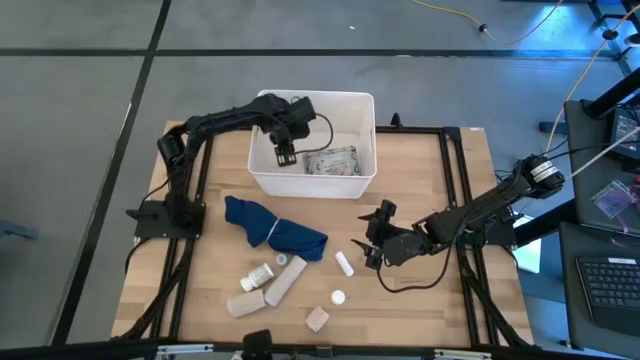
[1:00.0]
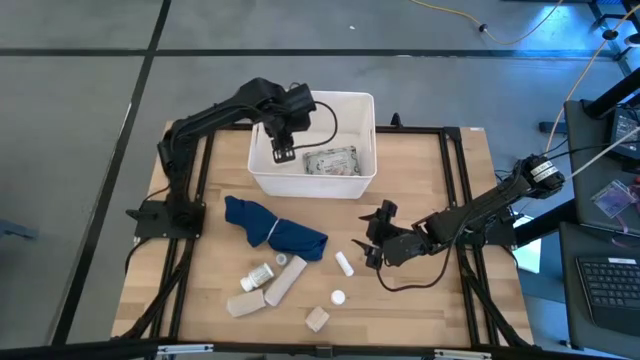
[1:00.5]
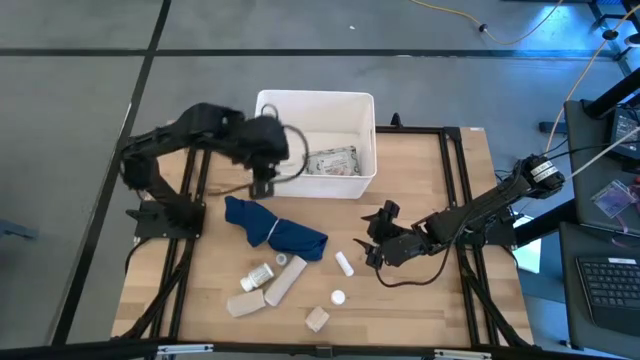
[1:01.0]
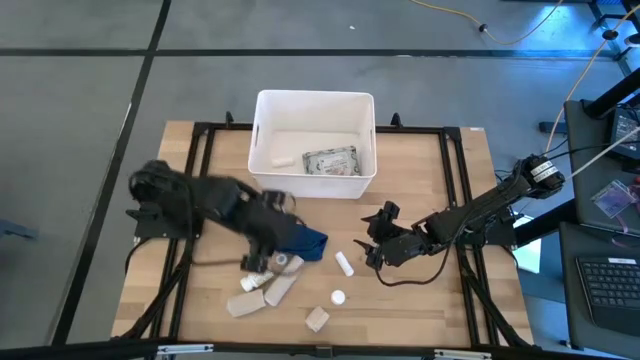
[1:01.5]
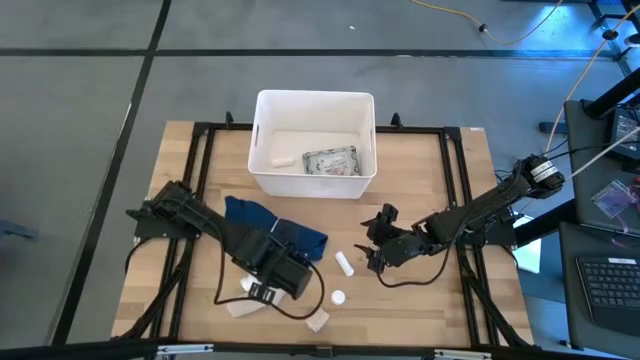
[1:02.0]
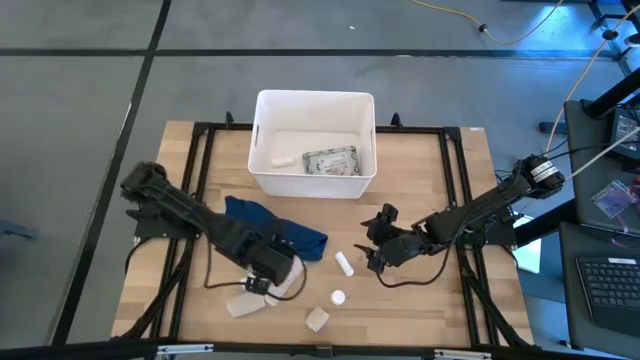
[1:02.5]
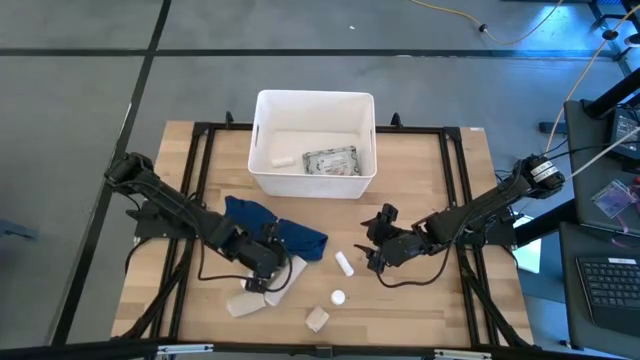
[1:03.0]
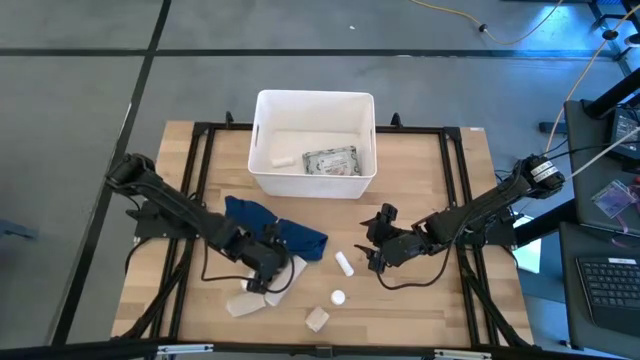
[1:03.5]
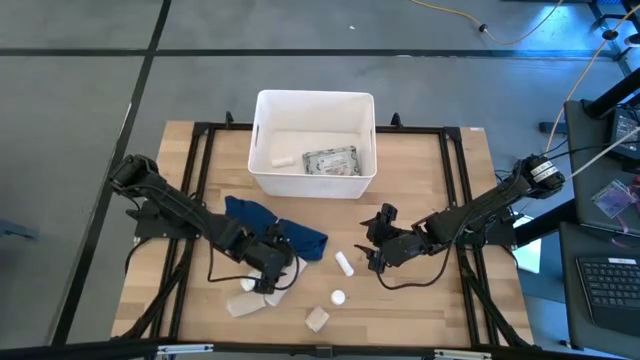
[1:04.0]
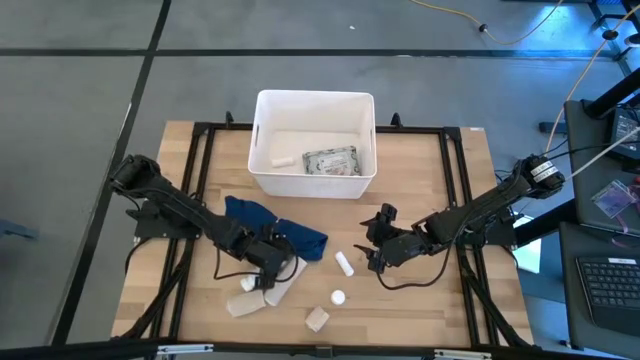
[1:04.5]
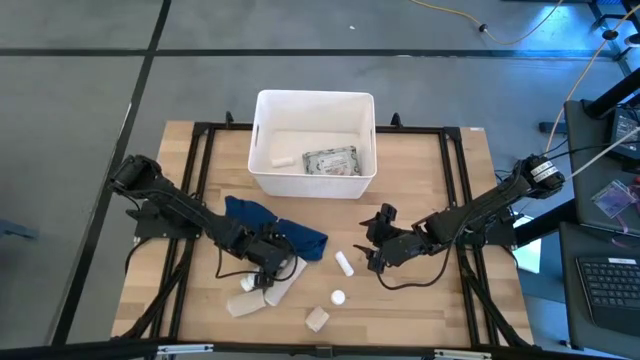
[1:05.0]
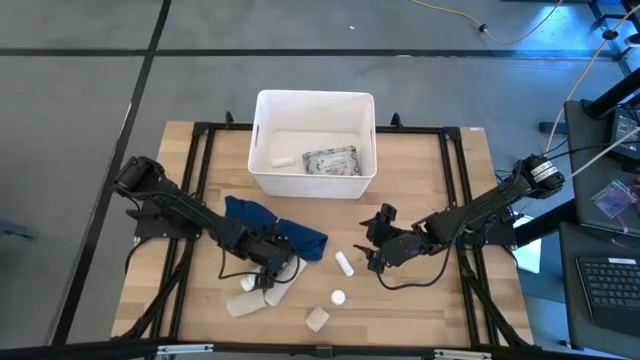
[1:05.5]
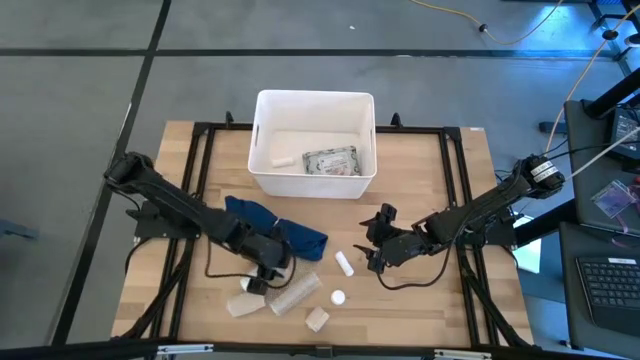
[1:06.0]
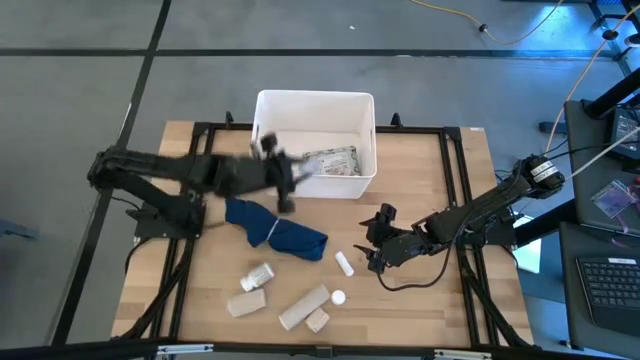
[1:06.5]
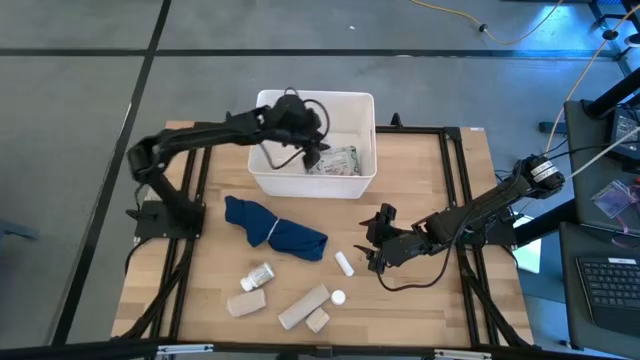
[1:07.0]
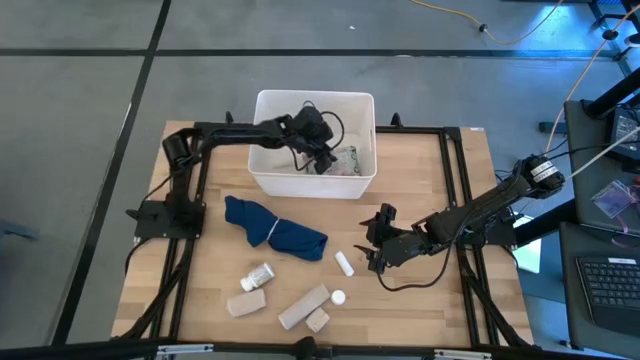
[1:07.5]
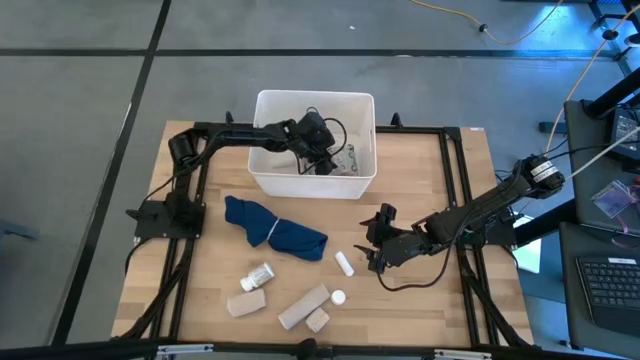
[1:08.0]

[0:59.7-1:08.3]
Task: Pick & place medical supplies in basket/bin
Put the transparent pill bottle into the white bin

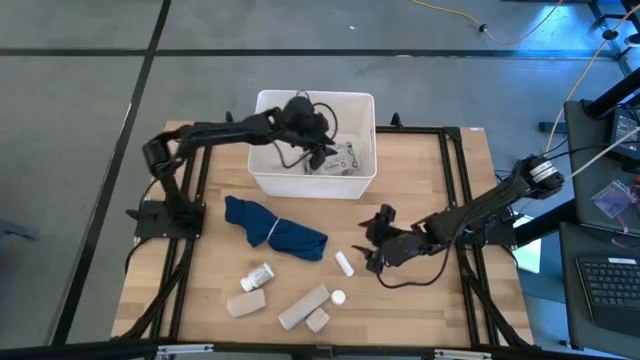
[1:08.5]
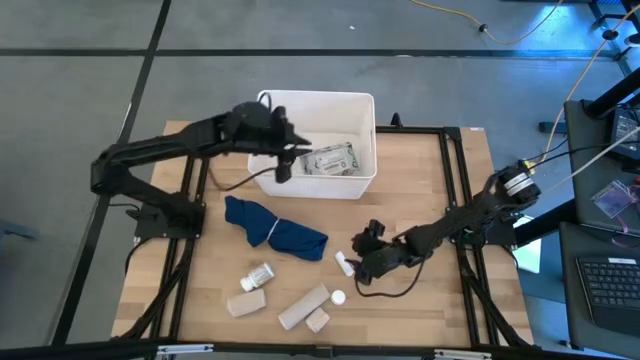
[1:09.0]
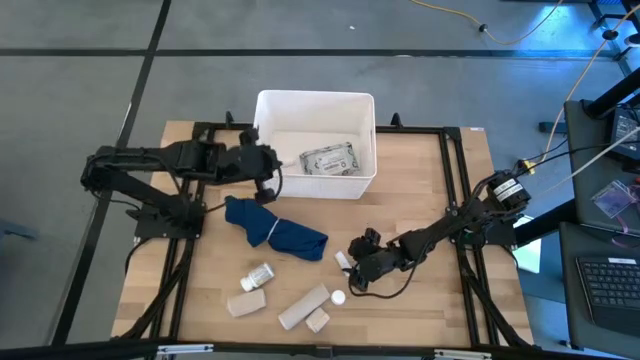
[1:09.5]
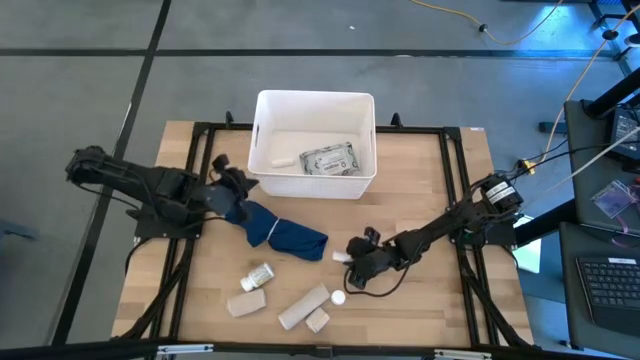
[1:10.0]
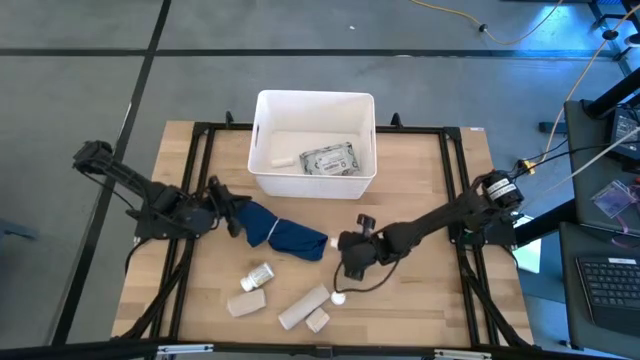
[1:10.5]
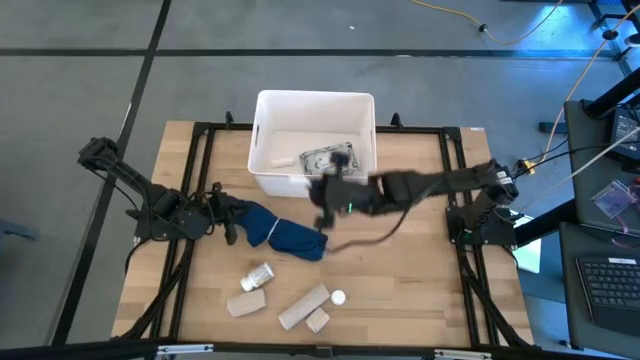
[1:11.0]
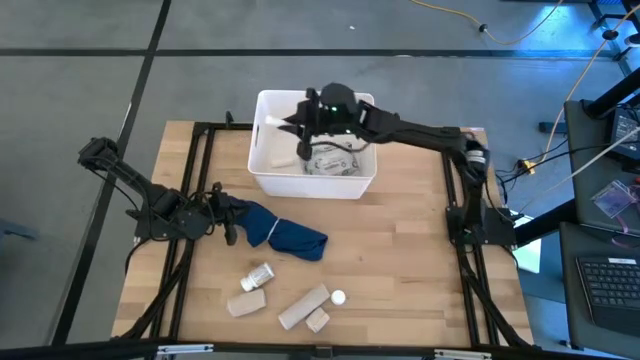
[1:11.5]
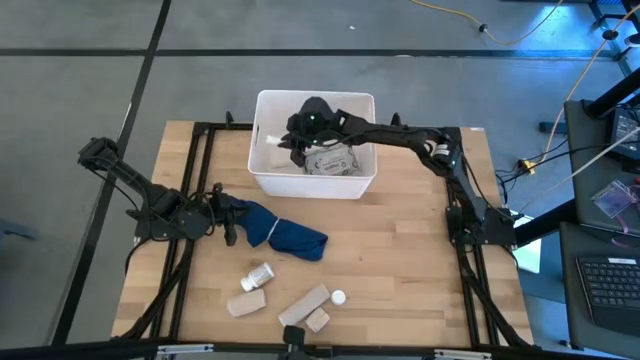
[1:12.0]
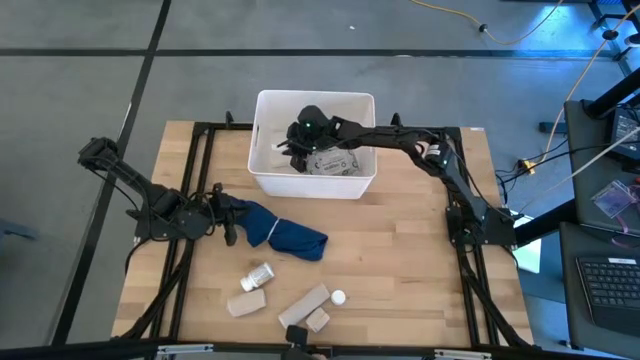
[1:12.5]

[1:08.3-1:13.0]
Put the white bandage into the white bin

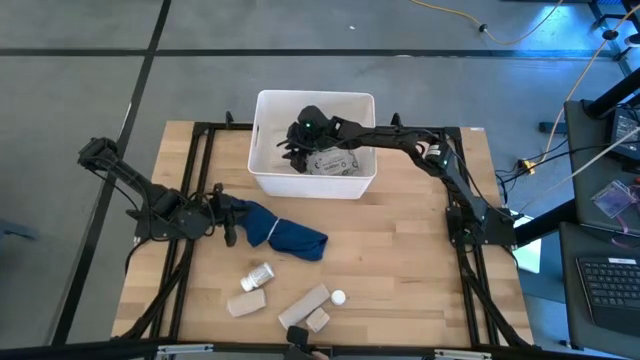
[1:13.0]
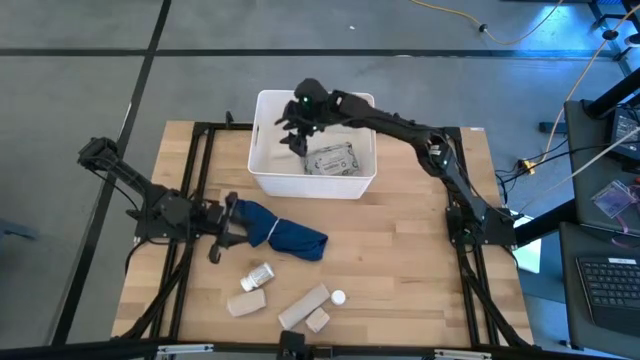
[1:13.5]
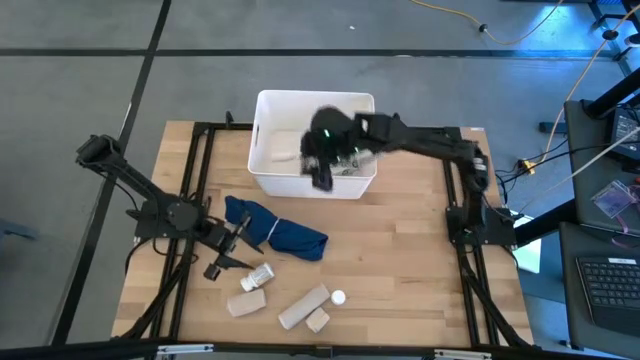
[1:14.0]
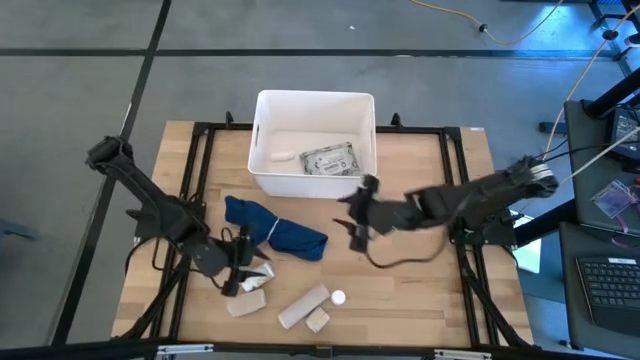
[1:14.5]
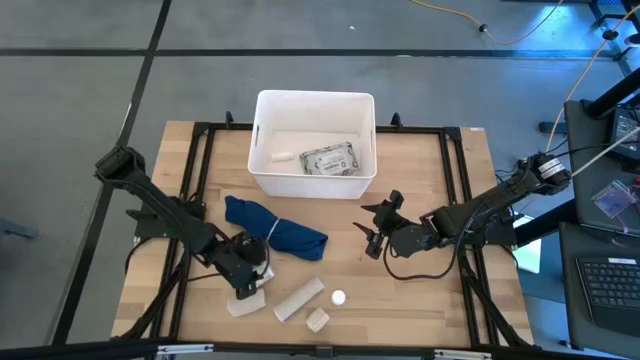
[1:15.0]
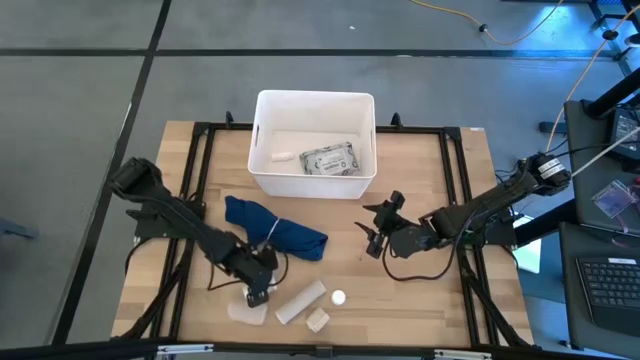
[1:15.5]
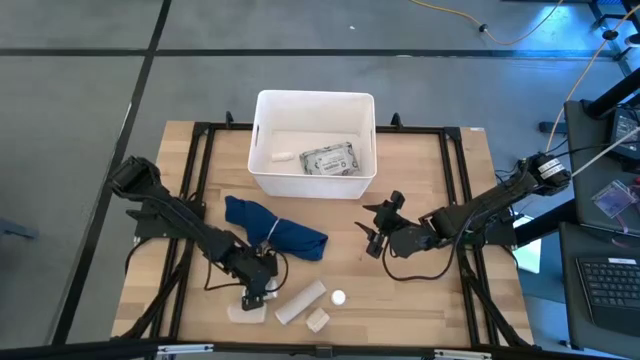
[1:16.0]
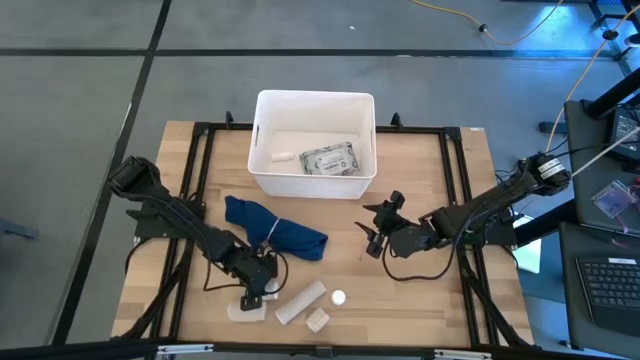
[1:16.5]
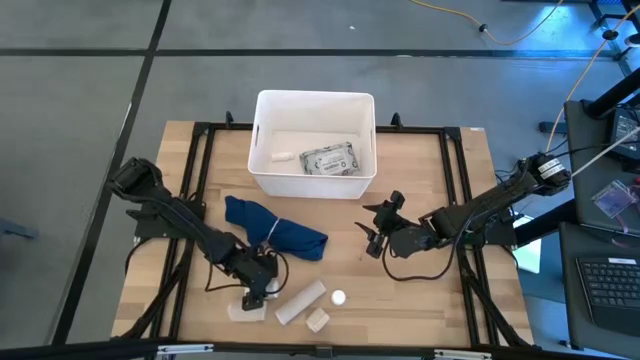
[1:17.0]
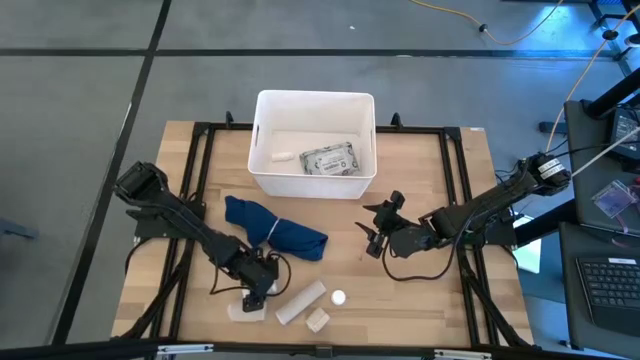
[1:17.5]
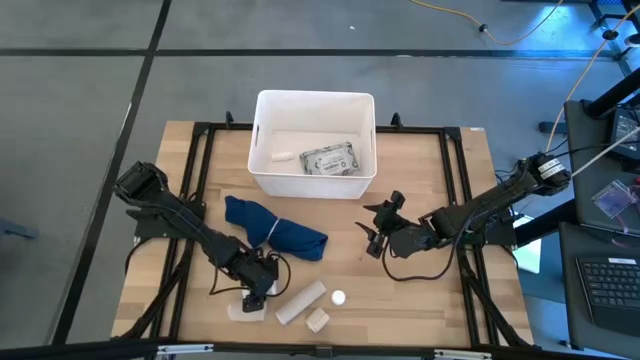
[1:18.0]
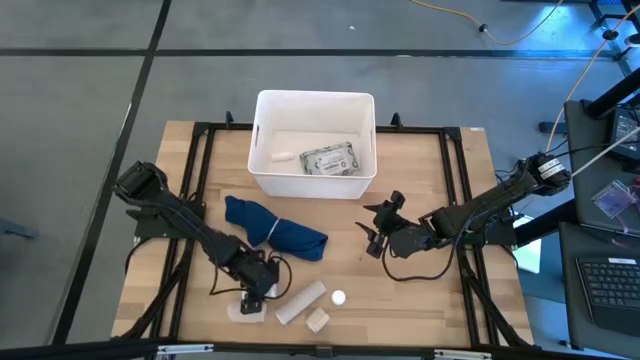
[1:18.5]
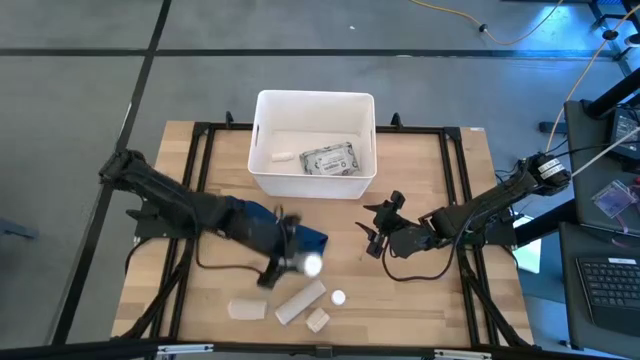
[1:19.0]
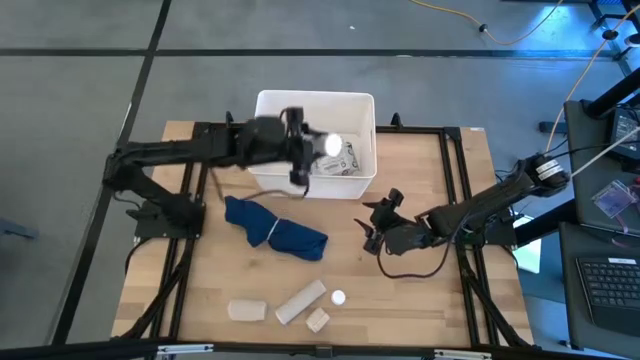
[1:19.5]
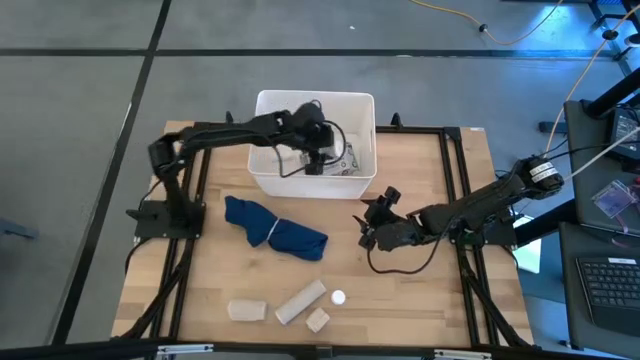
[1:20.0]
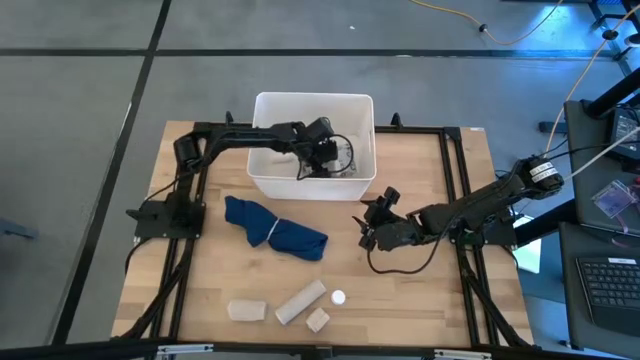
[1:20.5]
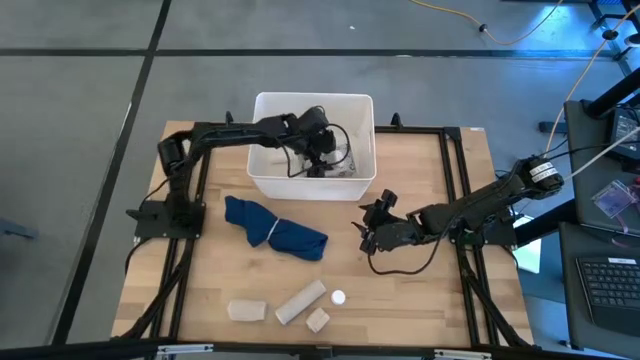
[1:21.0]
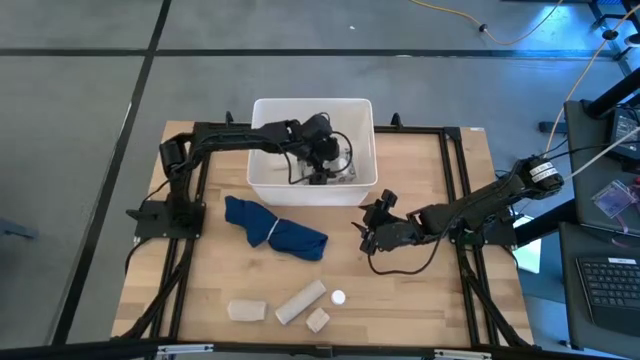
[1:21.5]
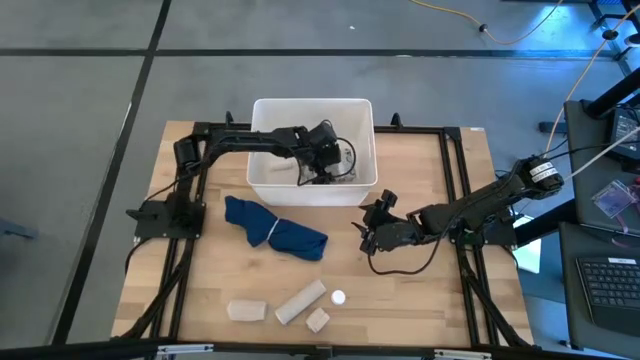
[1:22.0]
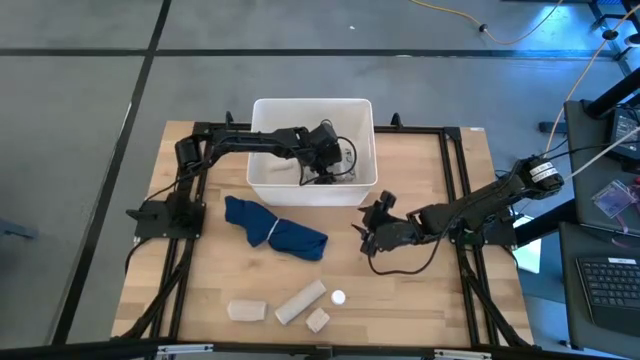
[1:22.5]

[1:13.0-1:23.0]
Put the left white medicine bottle into the white bin
